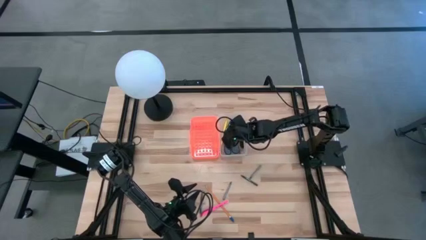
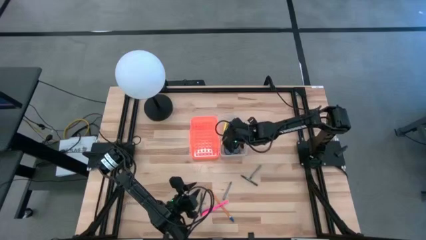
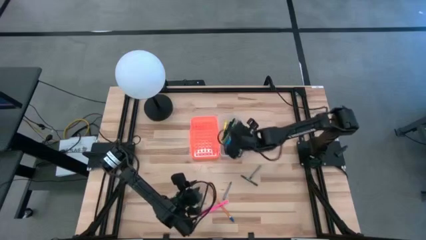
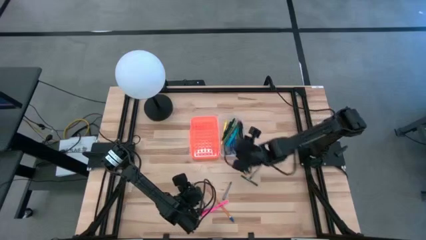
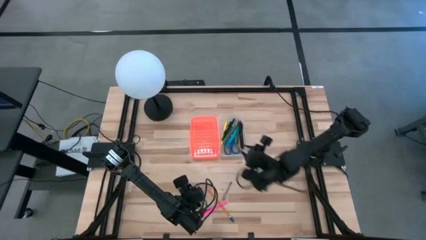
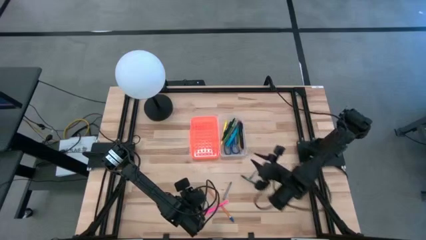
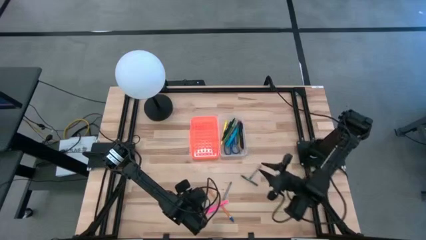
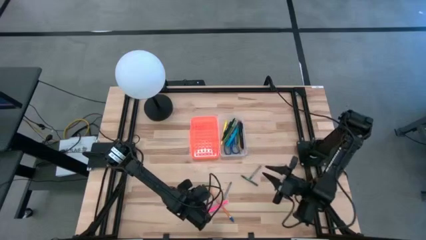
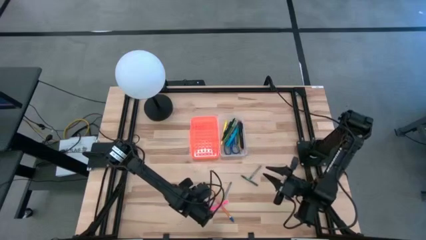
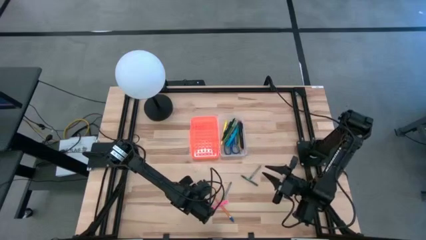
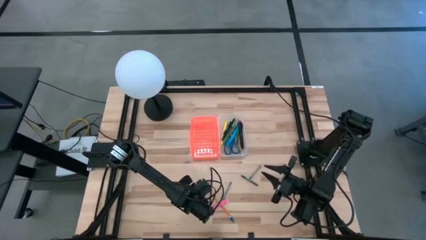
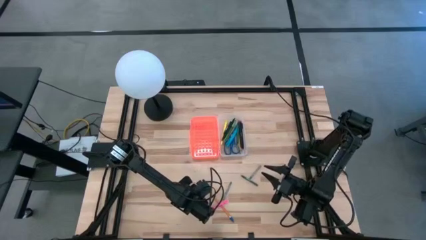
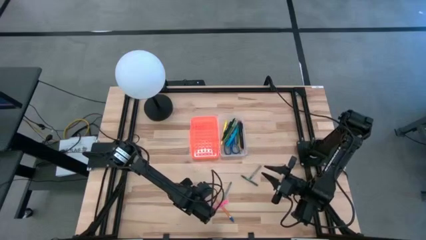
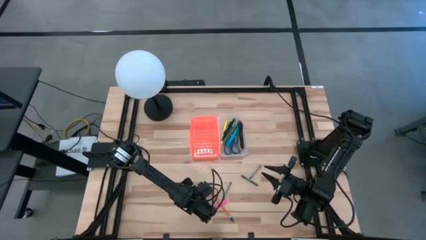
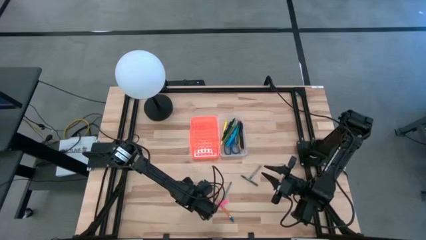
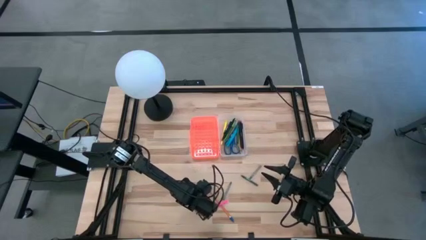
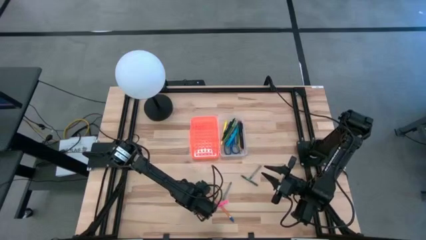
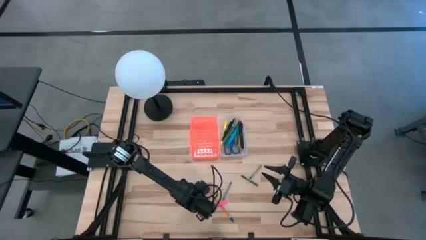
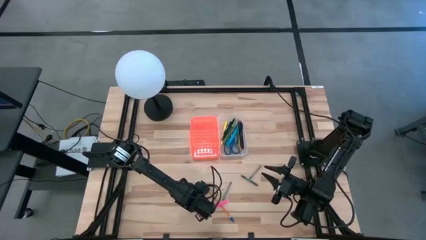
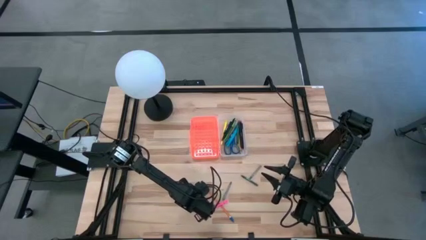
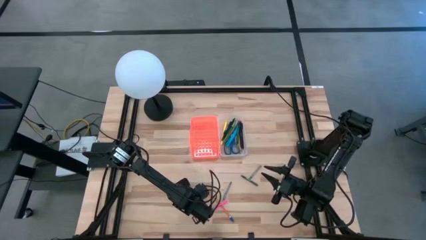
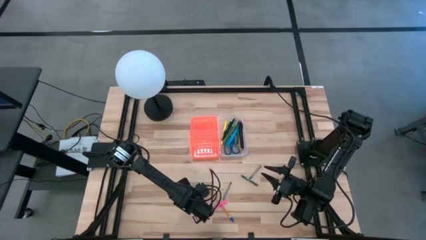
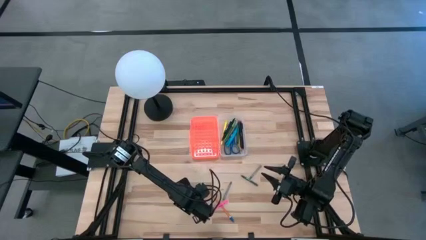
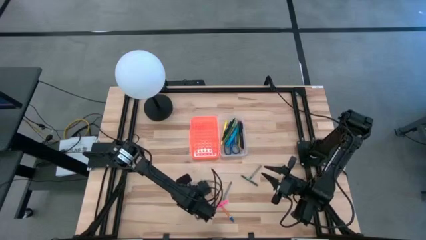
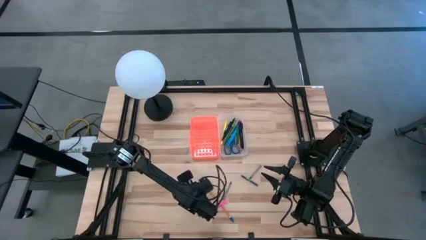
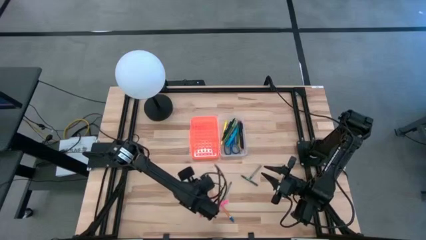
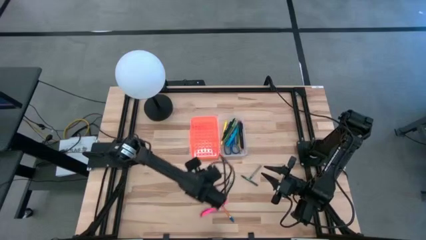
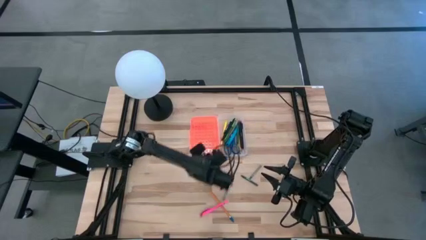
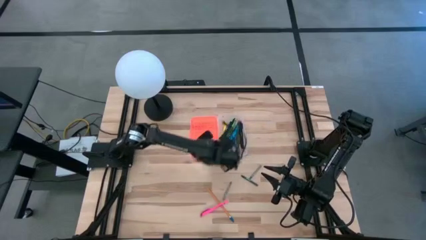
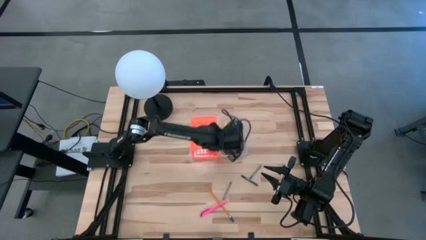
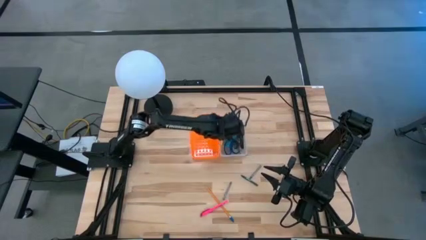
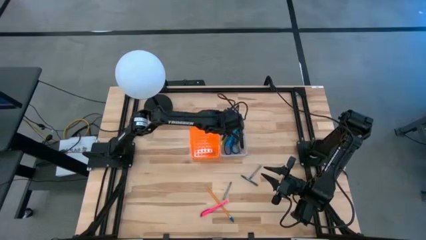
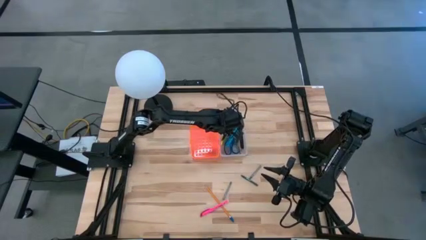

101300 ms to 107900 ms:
Task: Pick & place school supplies into a supply box
Put the green crayon into the orange supply box

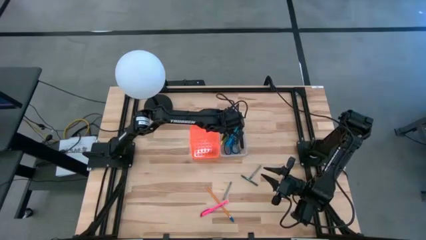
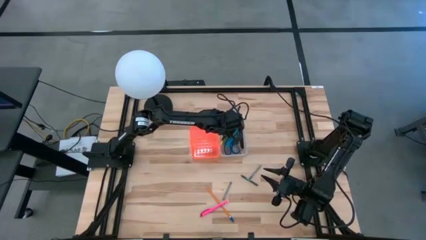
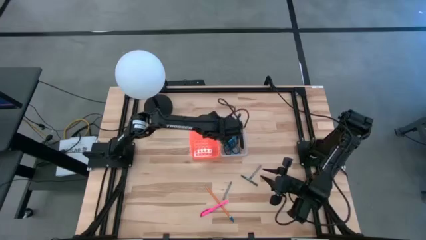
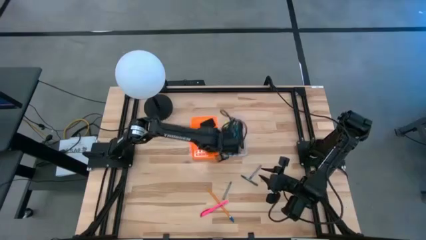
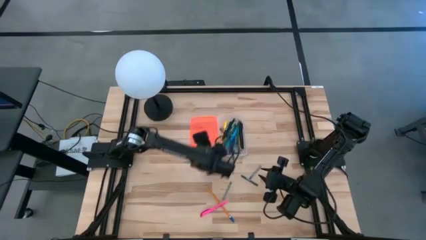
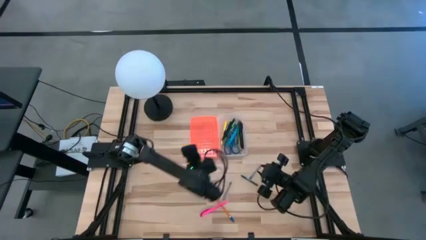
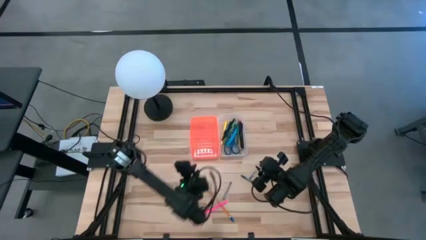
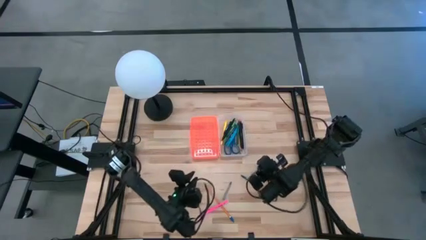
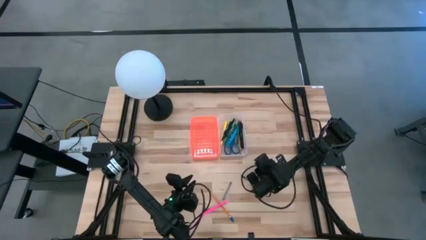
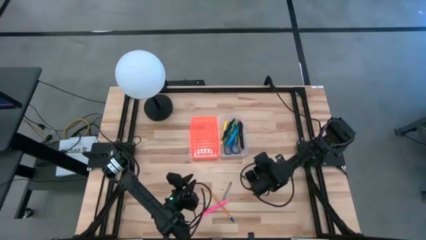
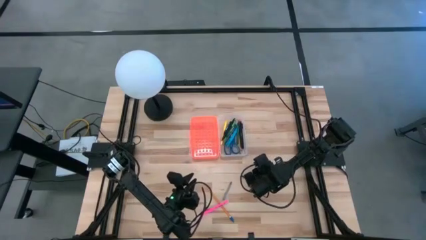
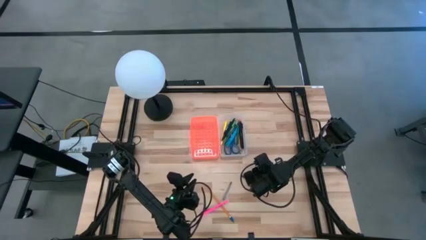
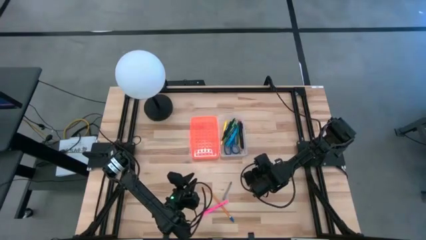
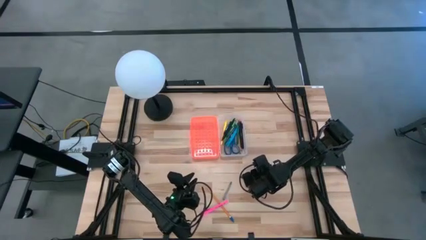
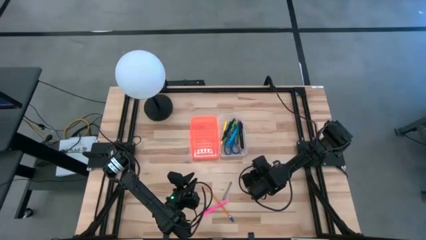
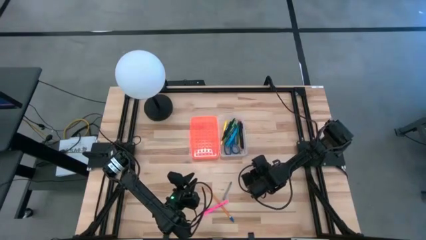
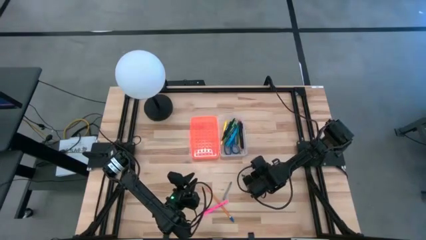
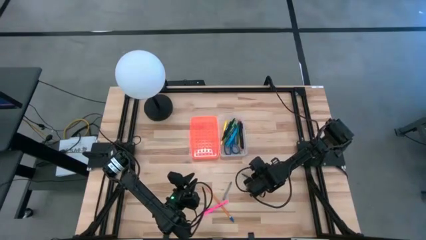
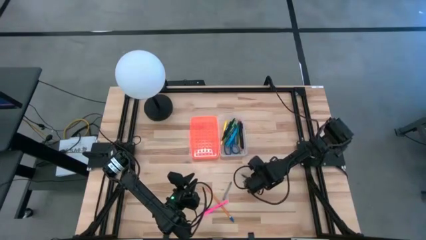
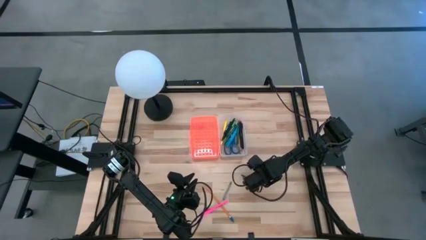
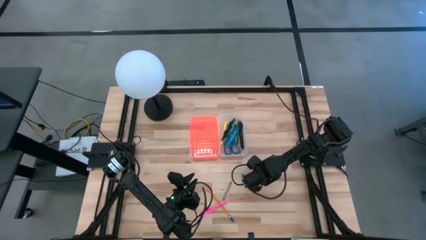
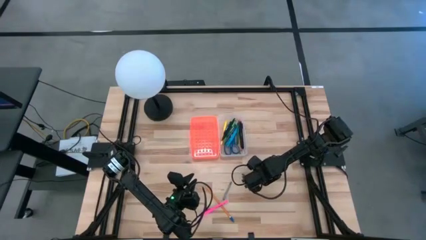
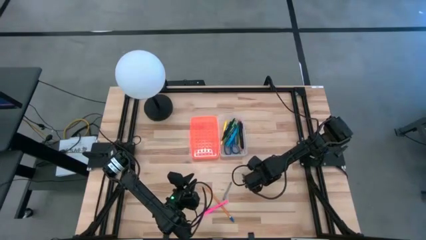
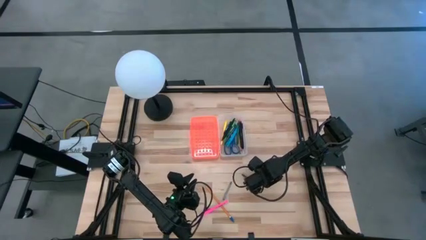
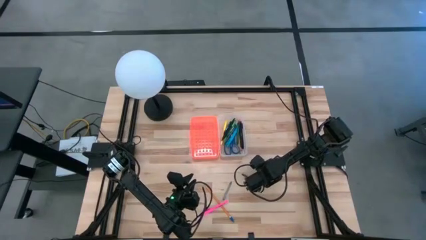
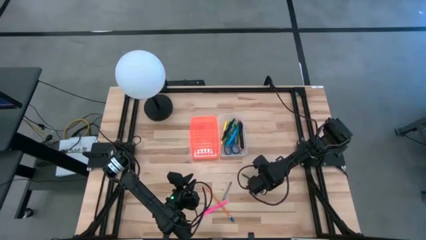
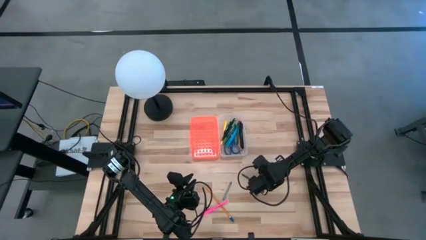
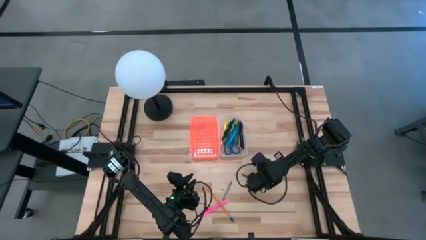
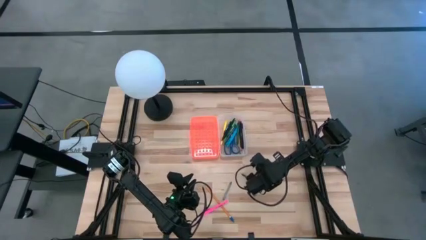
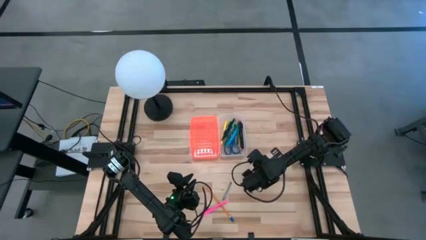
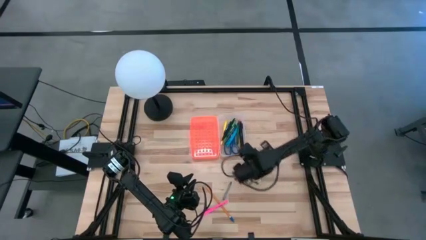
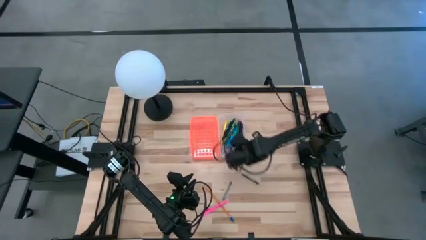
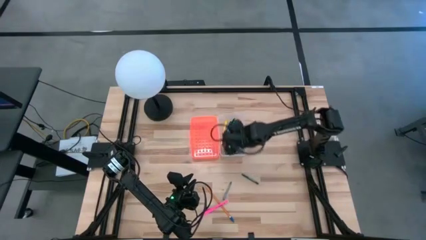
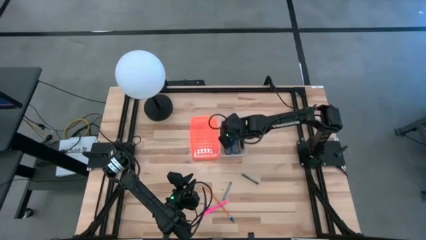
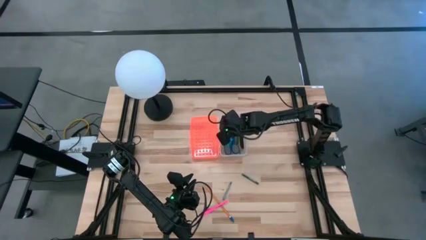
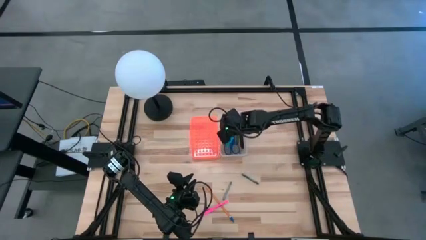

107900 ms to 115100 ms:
Put the gray crayon into the orange supply box

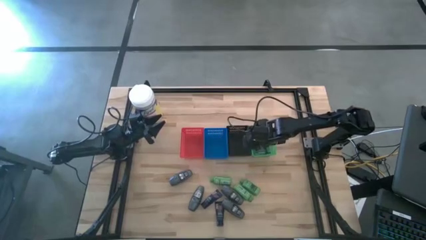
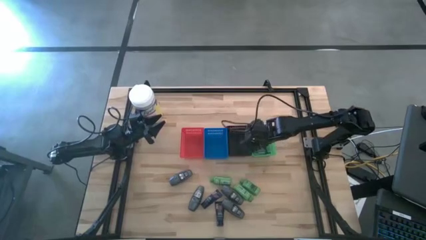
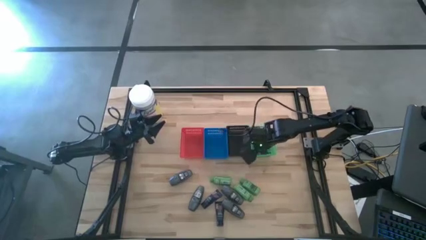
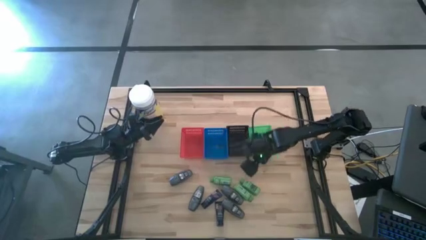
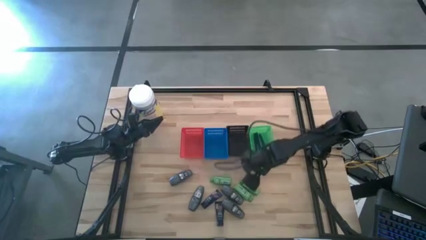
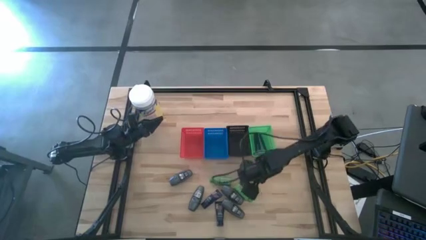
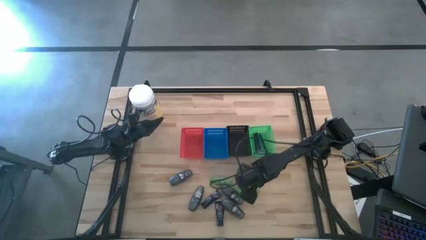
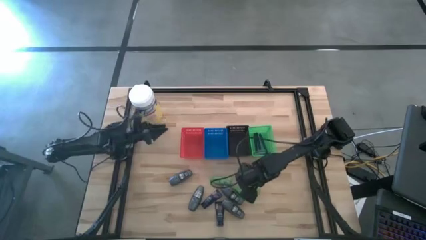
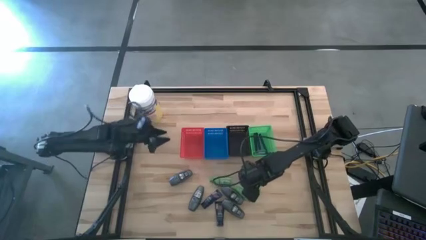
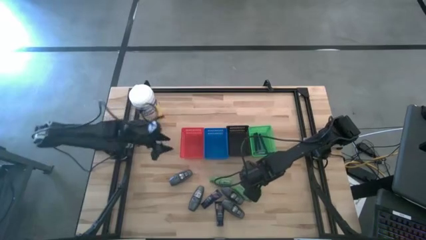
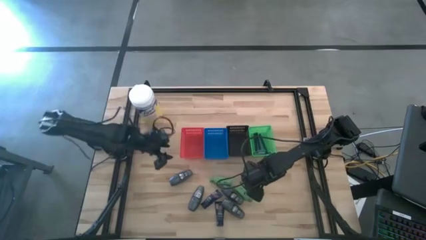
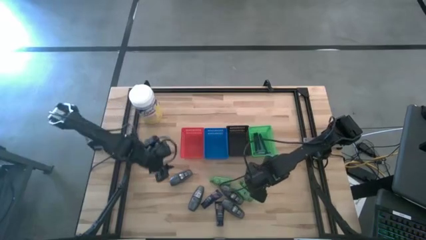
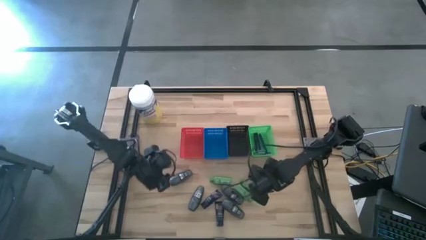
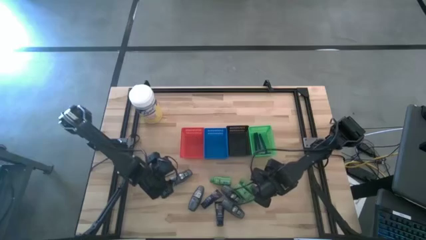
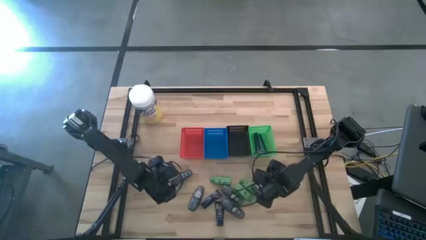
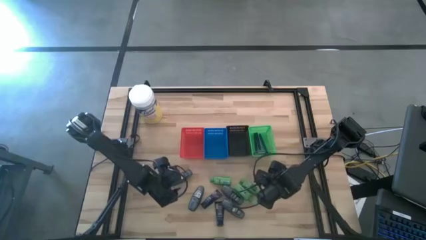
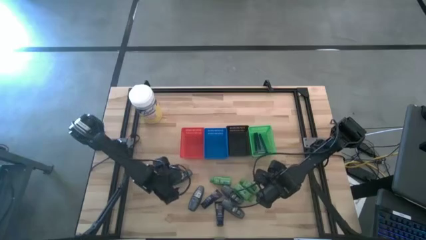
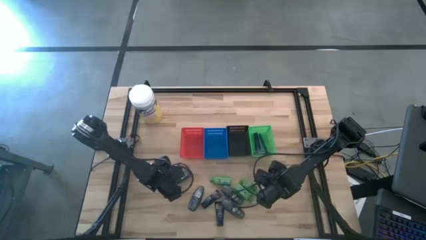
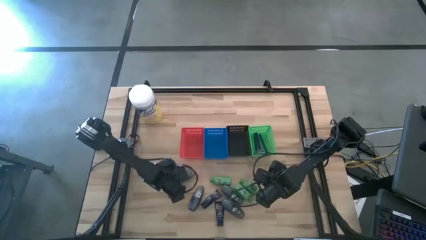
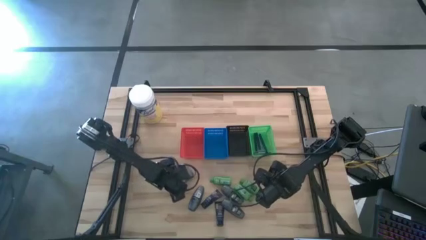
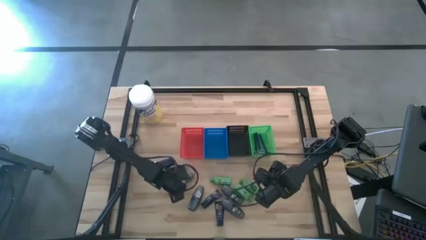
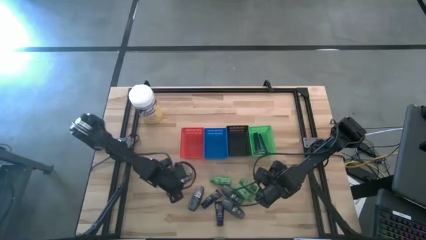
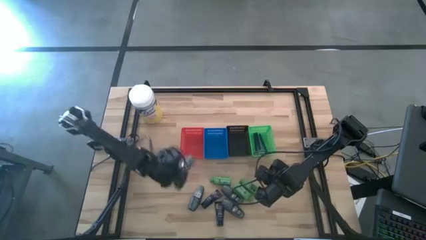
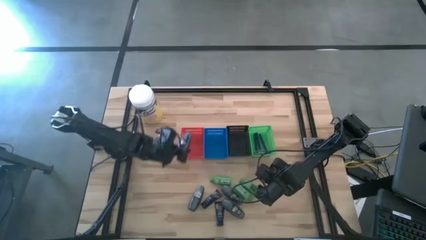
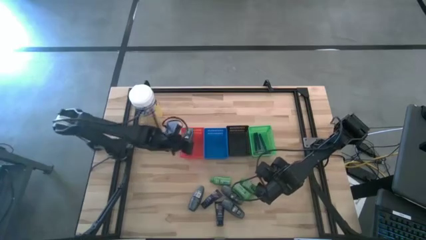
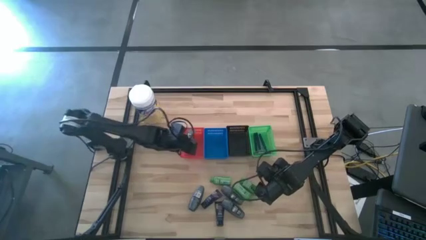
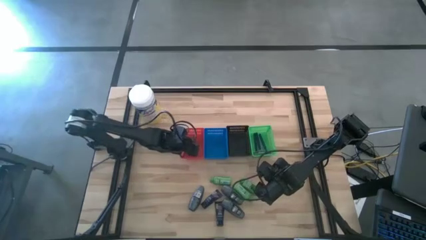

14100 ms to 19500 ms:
Task: Pick & Place Travel size toiletries
Put the black deodorant into the red bin
